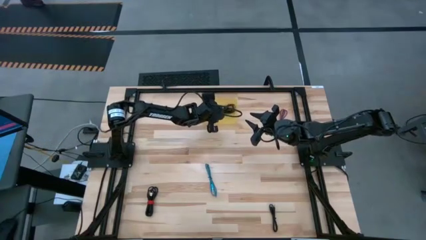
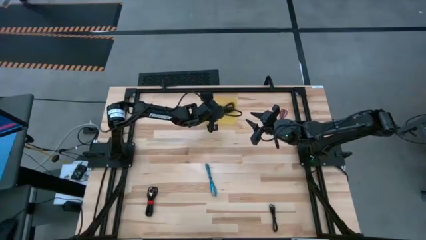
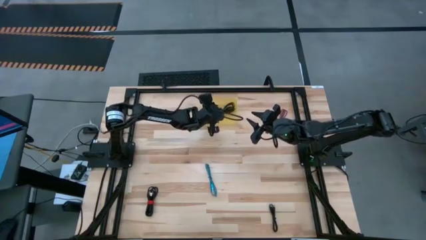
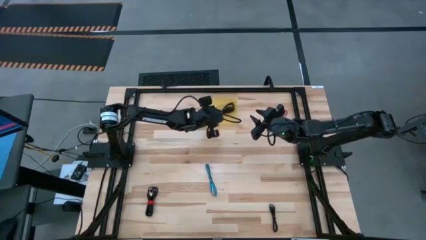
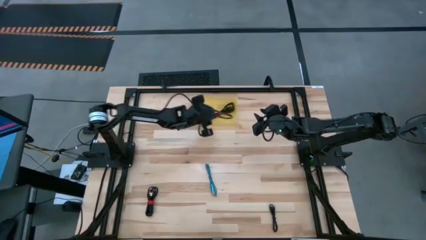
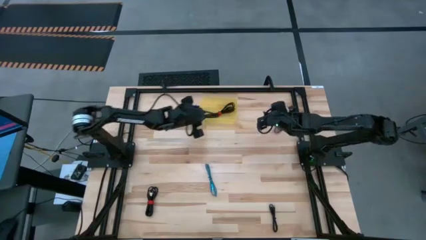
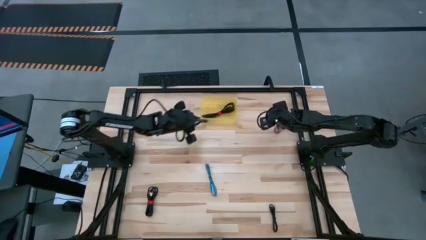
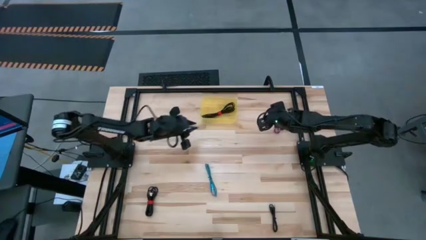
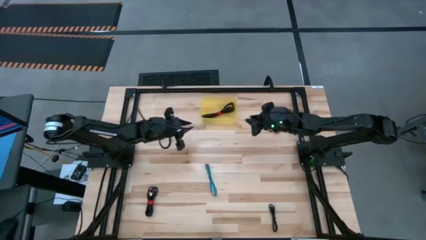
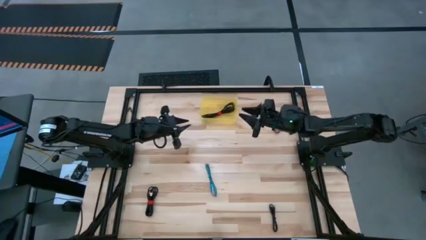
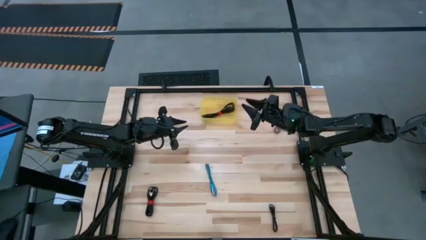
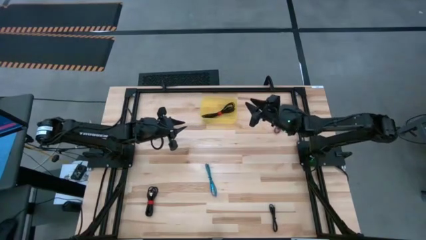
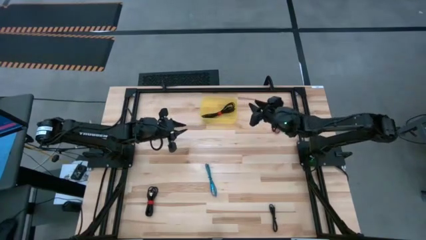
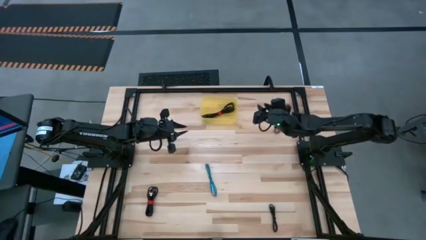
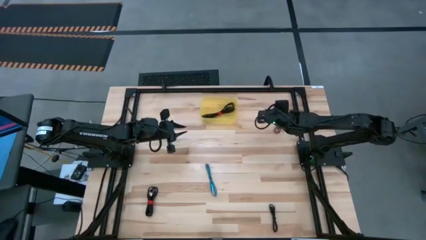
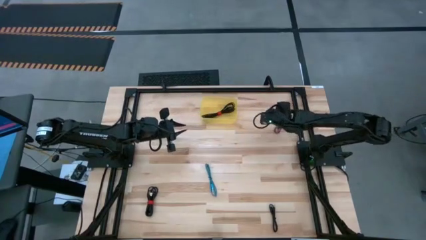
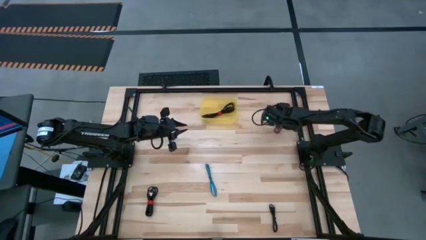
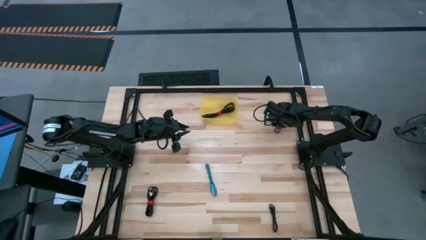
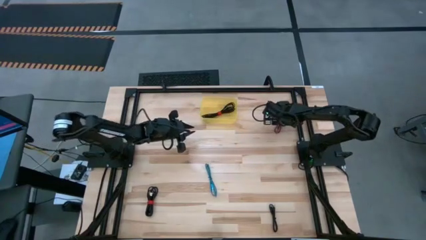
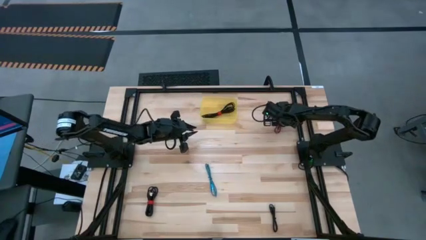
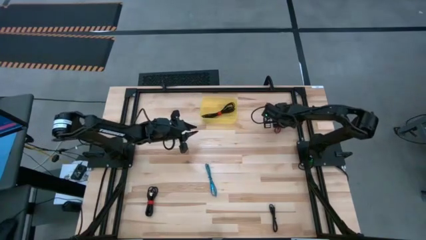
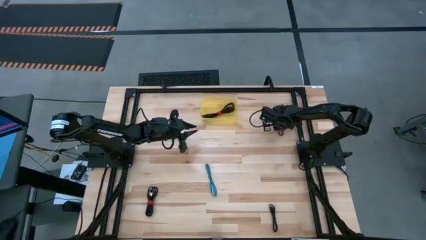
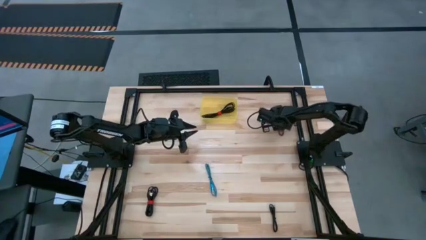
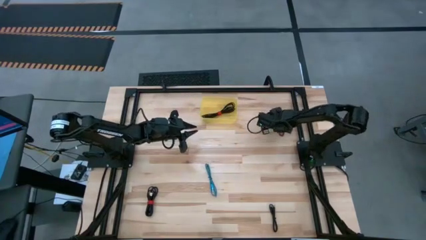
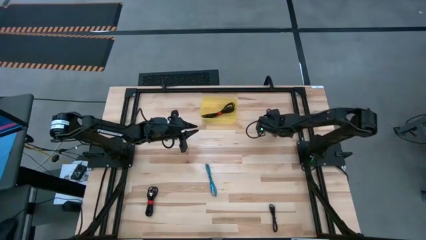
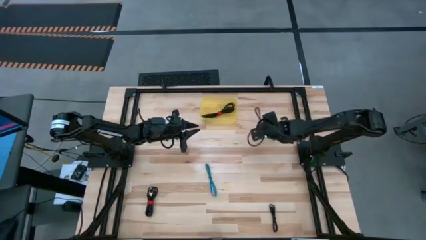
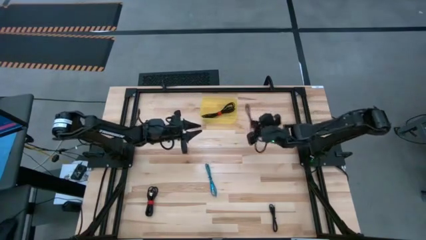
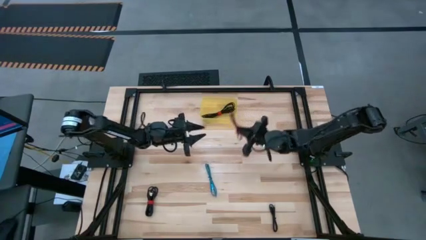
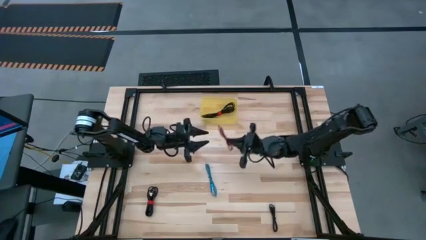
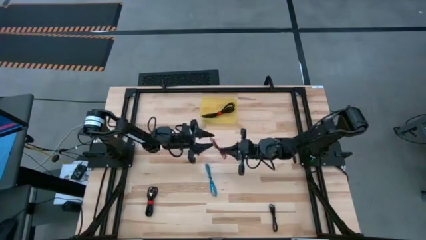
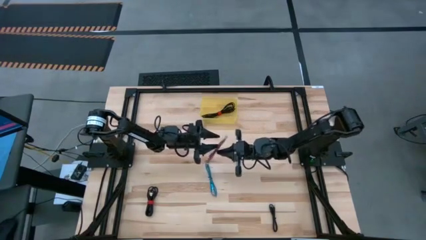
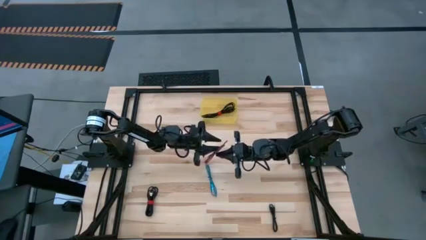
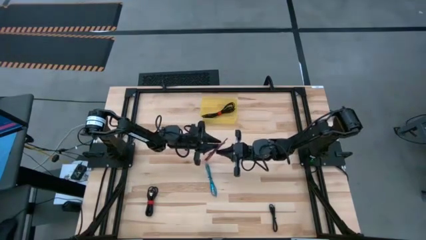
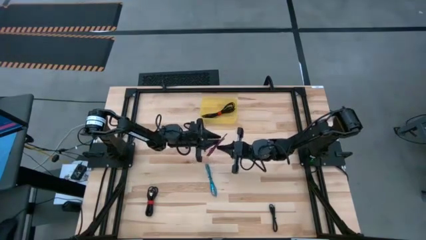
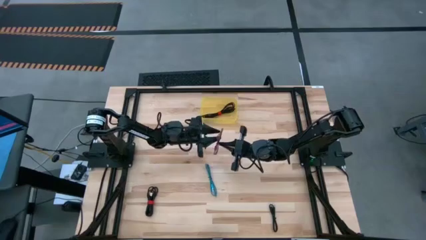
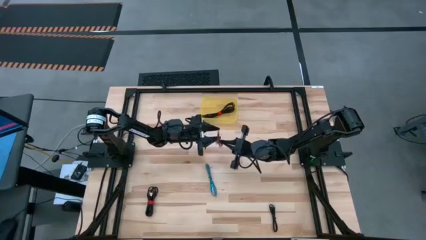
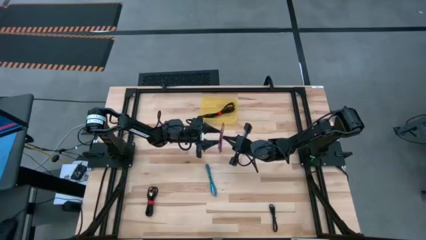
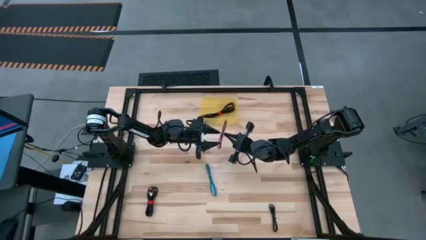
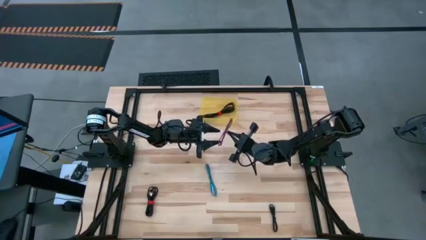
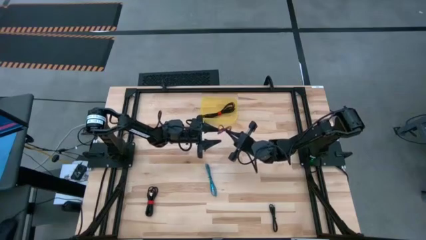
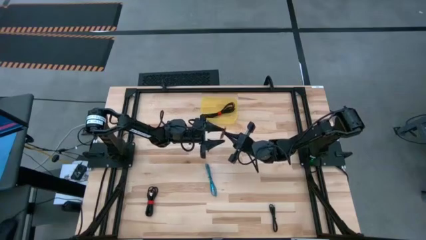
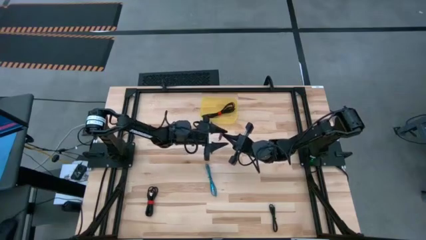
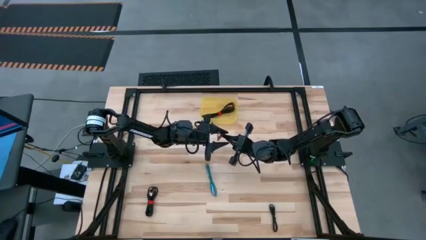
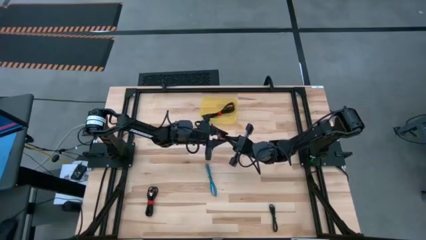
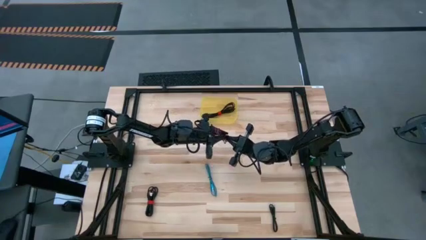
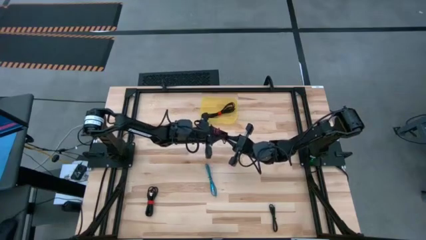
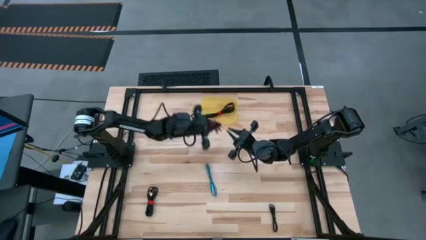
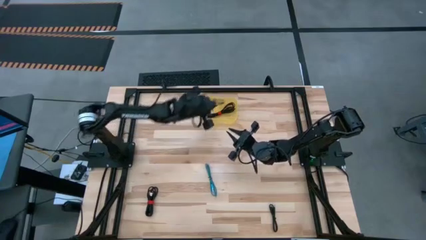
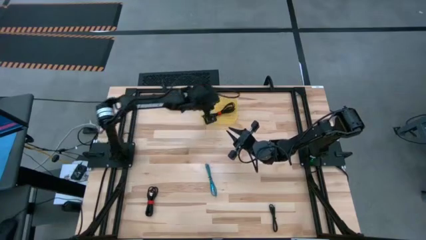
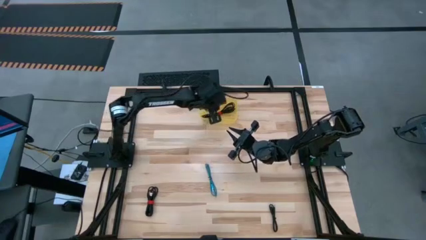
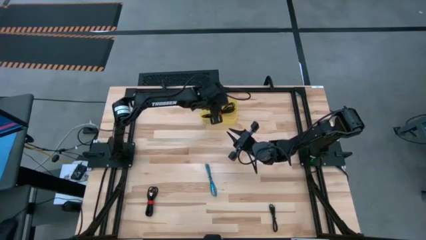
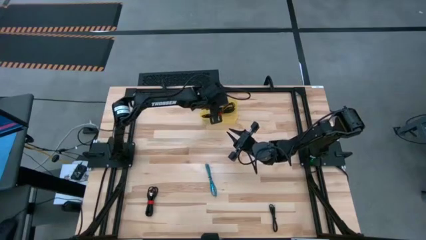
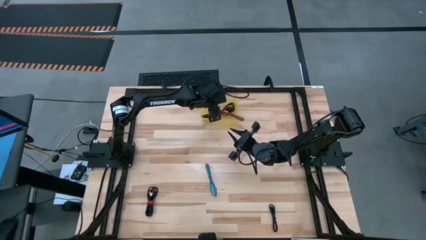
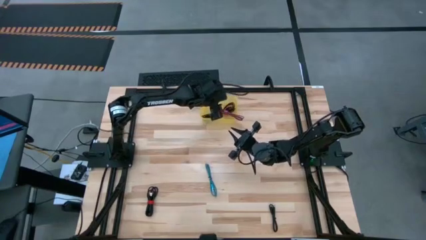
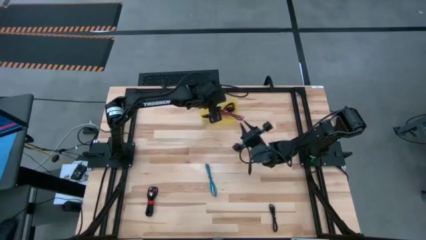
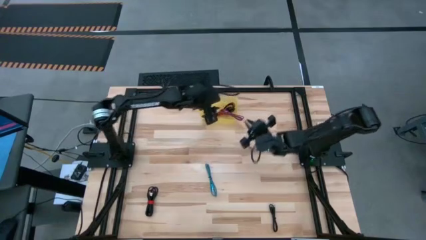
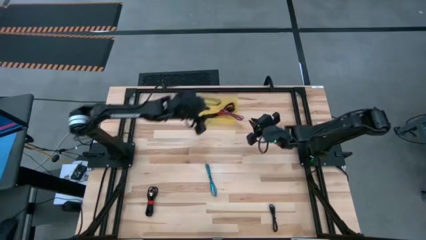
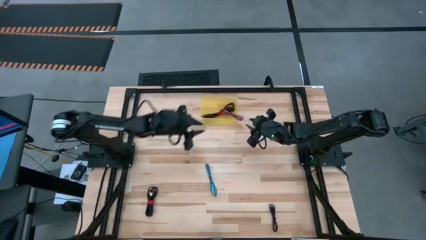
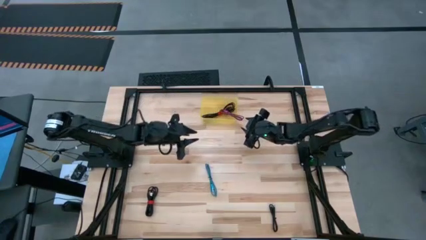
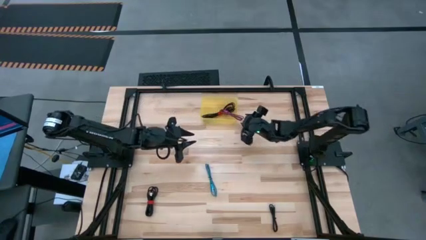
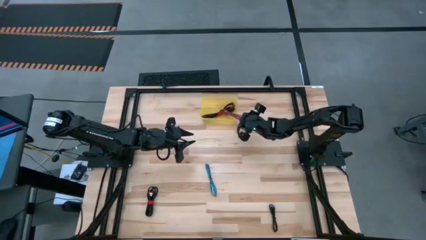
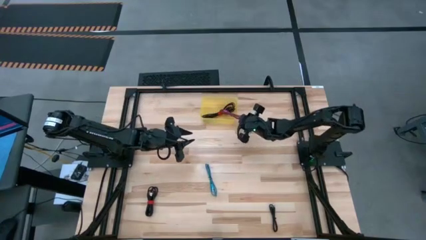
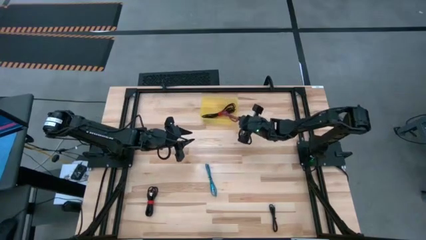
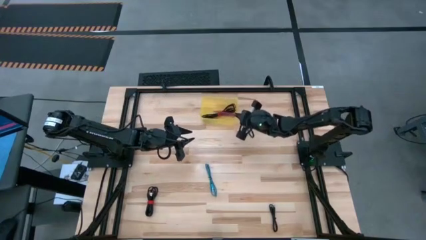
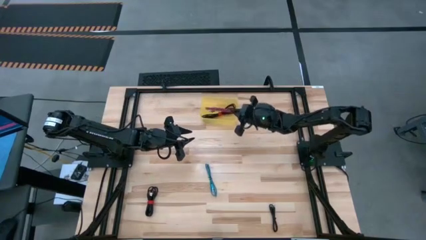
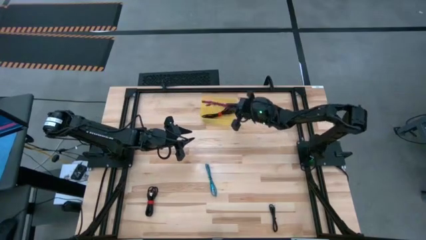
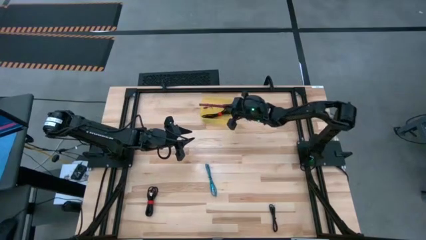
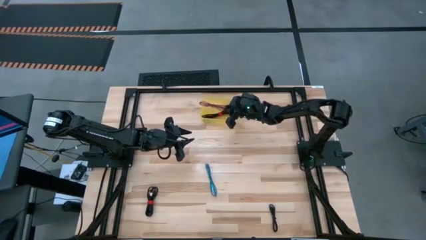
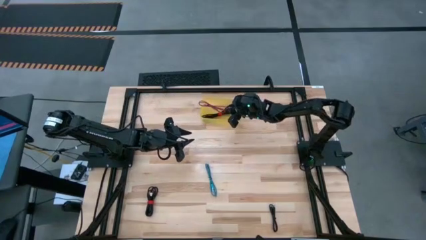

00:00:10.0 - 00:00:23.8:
Task: Pick and place USB-C Cables
Put the pink charger cable into the yellow container

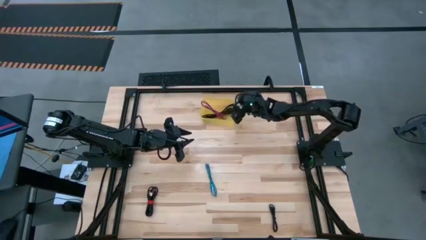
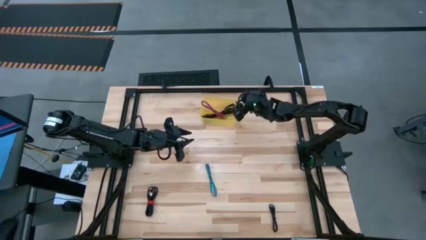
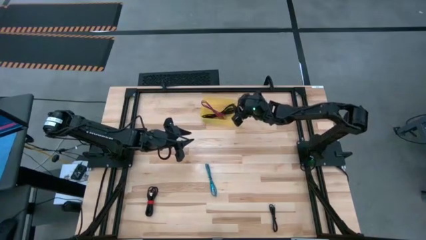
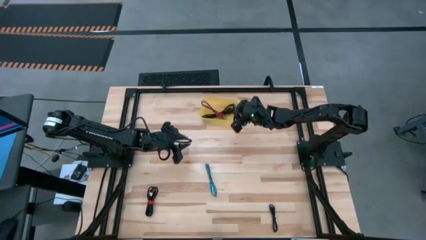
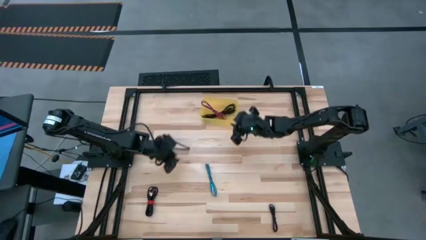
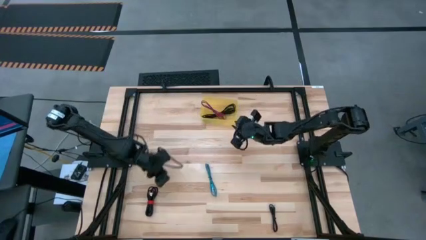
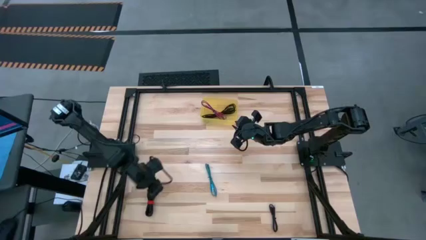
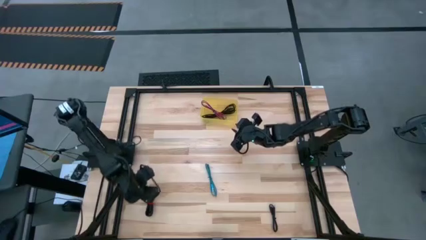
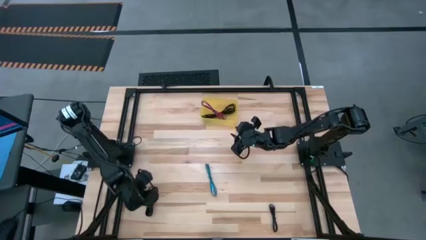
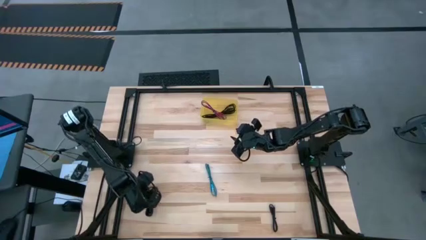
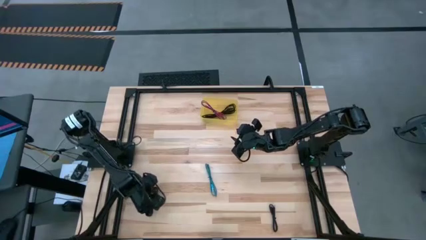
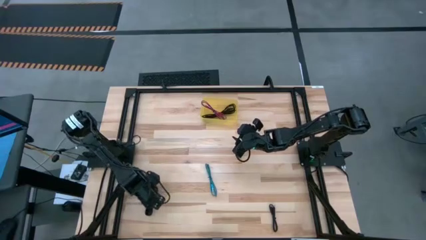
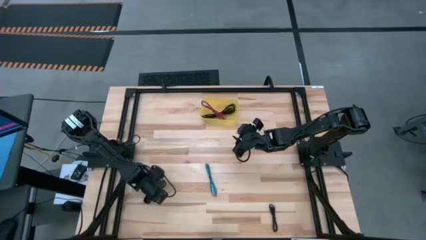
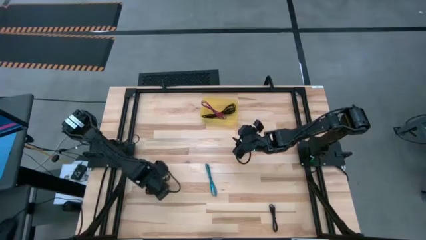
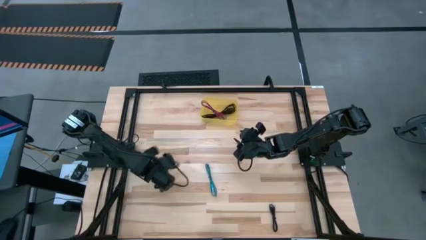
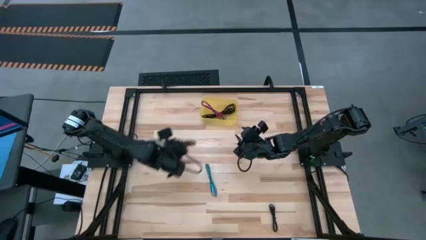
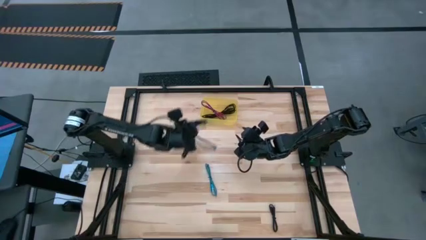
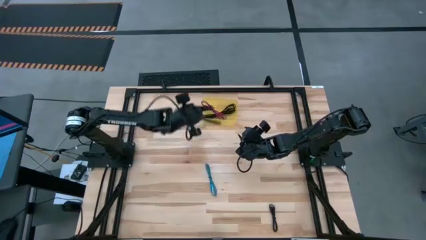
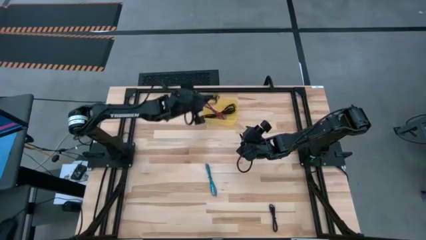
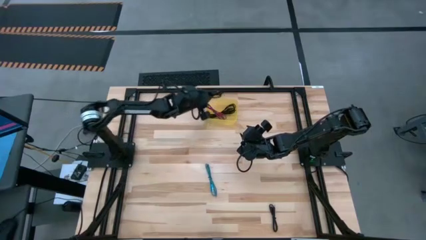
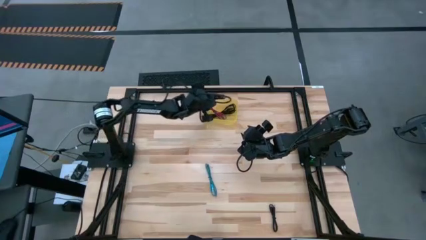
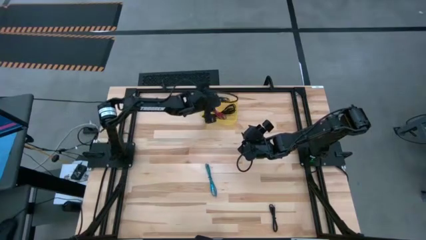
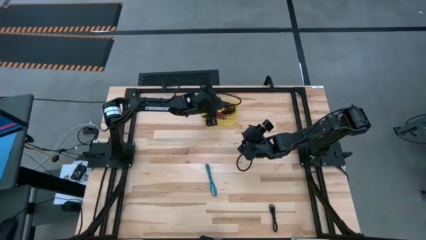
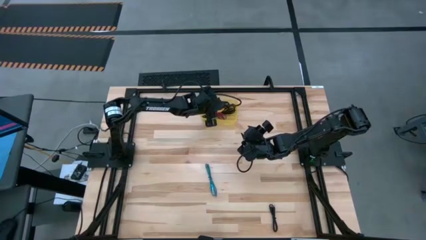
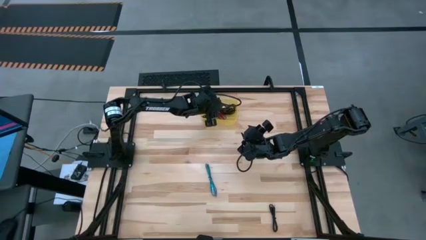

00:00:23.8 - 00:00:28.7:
Put the left black charger cable into the yellow container
